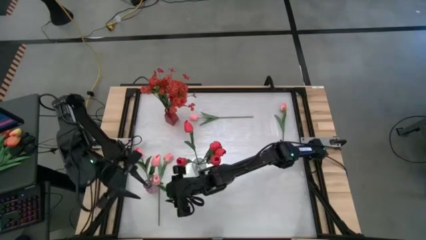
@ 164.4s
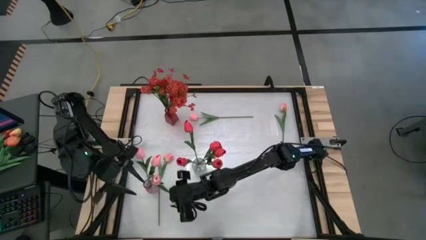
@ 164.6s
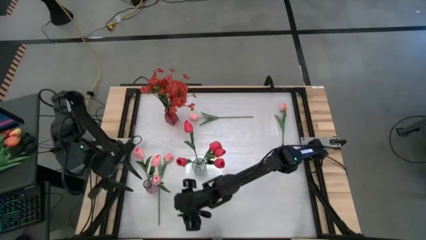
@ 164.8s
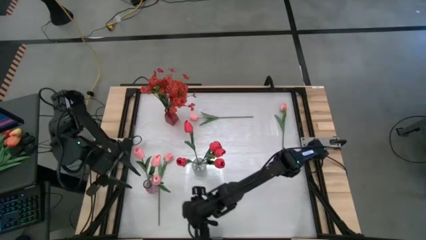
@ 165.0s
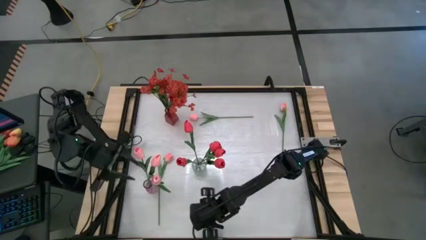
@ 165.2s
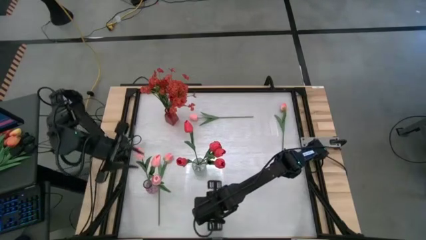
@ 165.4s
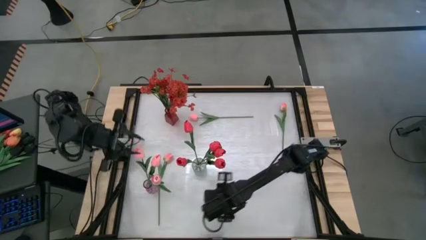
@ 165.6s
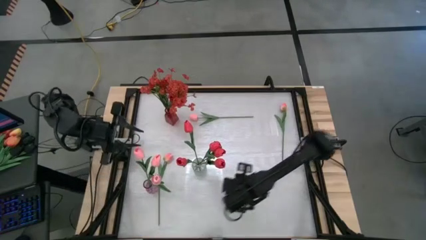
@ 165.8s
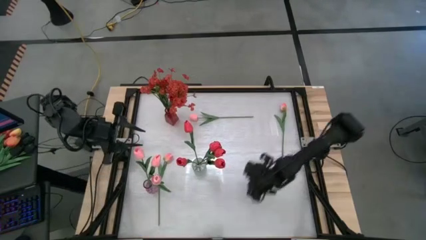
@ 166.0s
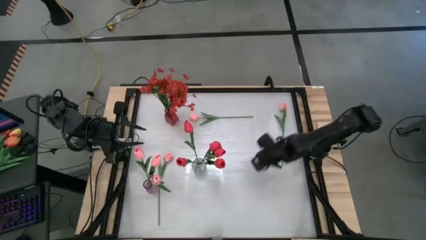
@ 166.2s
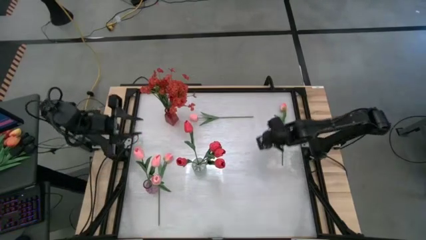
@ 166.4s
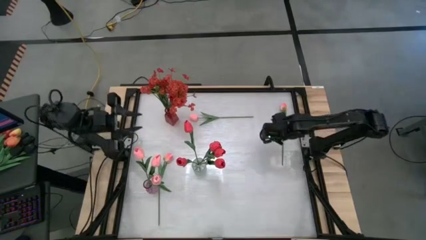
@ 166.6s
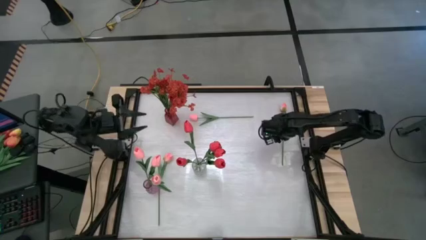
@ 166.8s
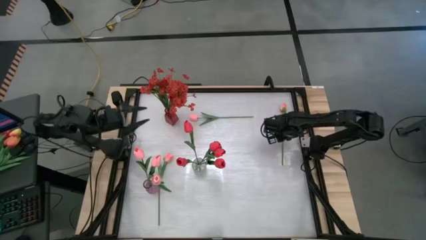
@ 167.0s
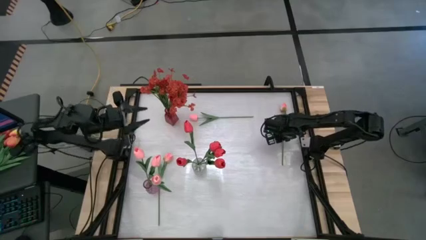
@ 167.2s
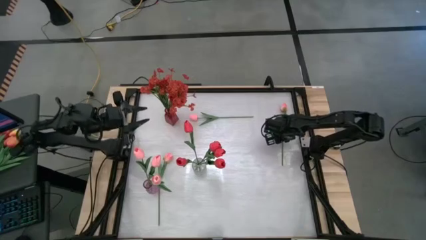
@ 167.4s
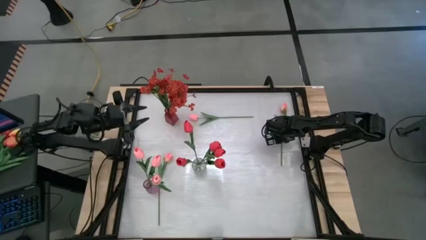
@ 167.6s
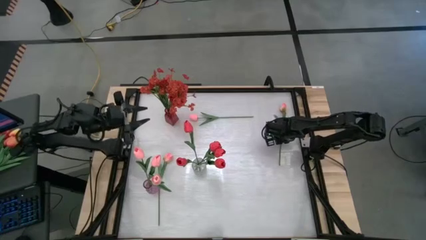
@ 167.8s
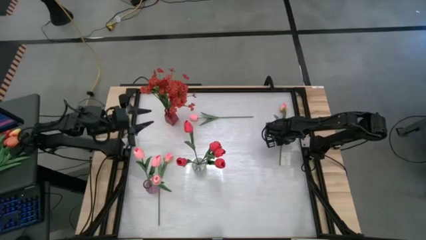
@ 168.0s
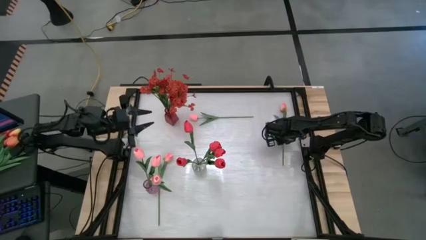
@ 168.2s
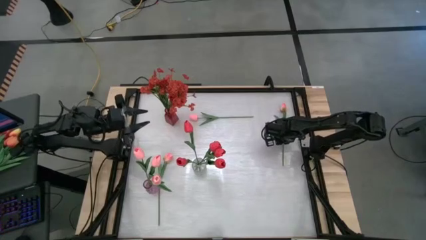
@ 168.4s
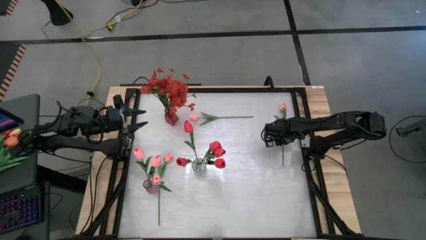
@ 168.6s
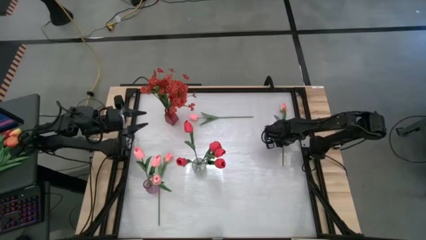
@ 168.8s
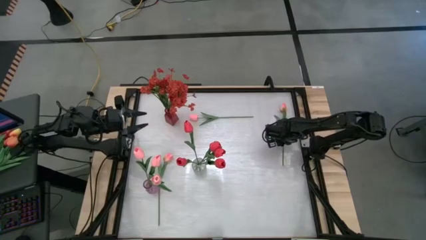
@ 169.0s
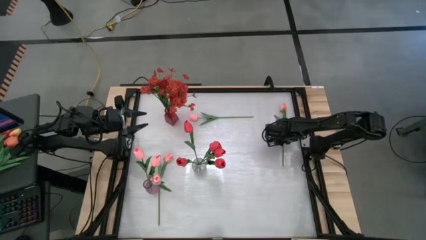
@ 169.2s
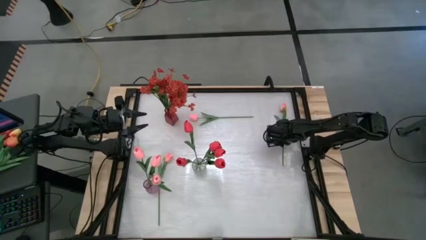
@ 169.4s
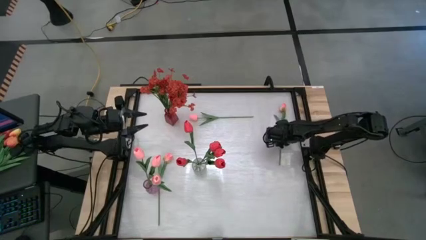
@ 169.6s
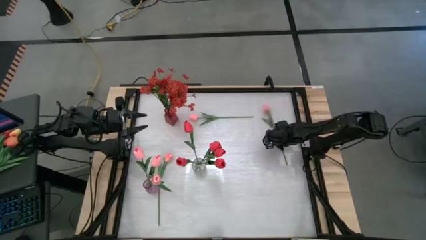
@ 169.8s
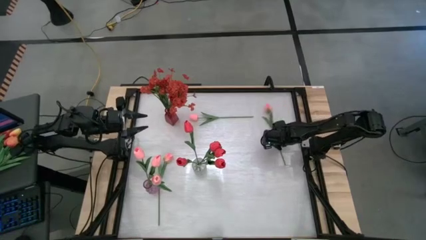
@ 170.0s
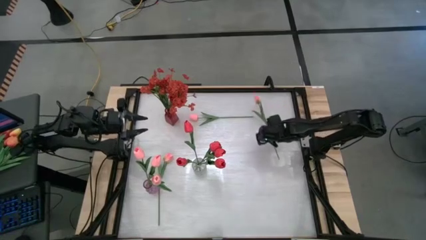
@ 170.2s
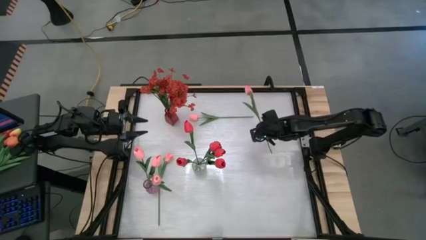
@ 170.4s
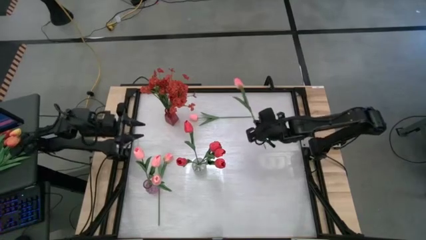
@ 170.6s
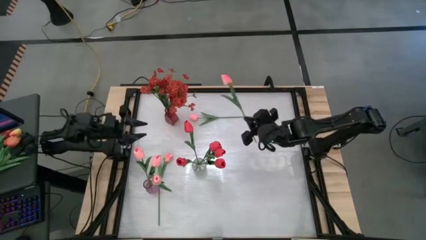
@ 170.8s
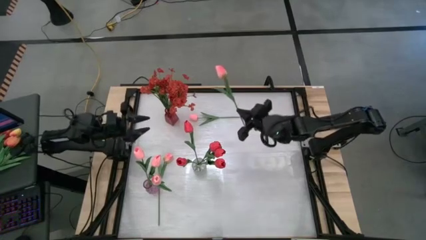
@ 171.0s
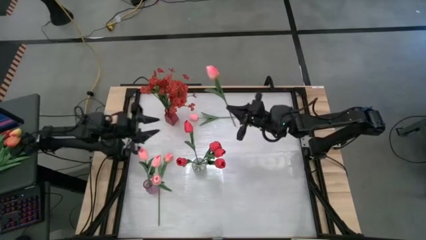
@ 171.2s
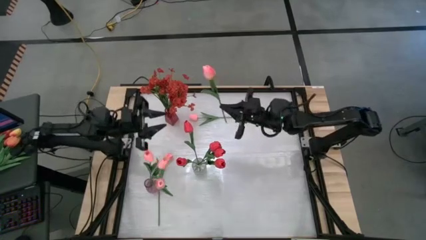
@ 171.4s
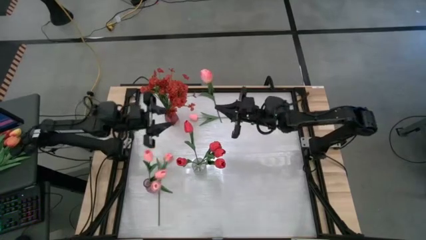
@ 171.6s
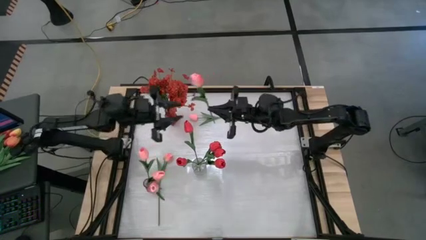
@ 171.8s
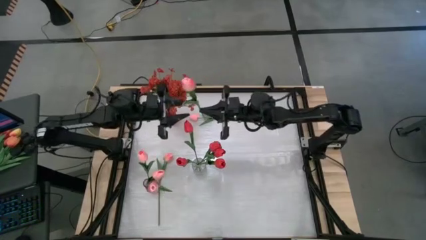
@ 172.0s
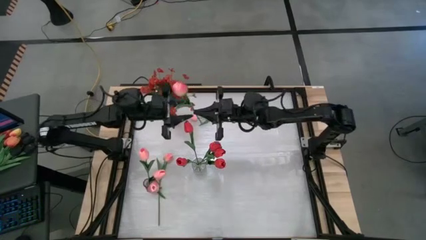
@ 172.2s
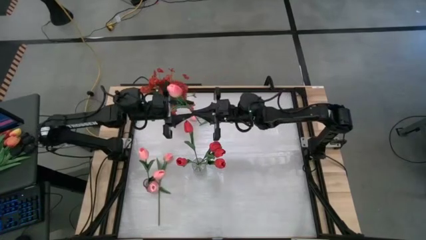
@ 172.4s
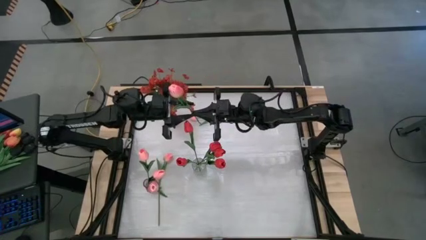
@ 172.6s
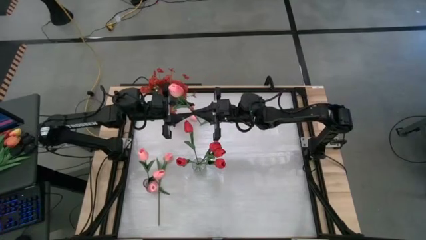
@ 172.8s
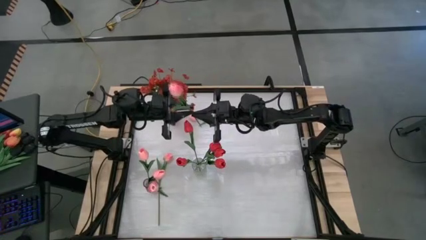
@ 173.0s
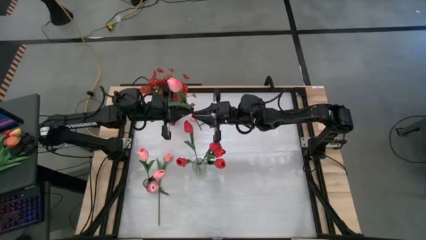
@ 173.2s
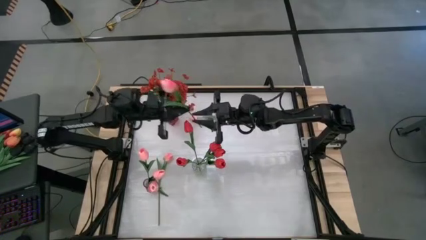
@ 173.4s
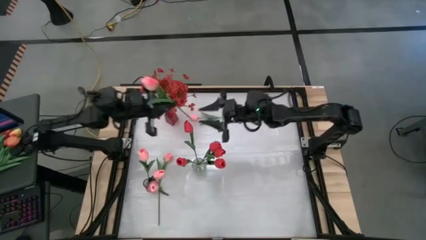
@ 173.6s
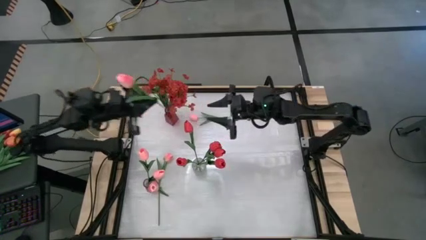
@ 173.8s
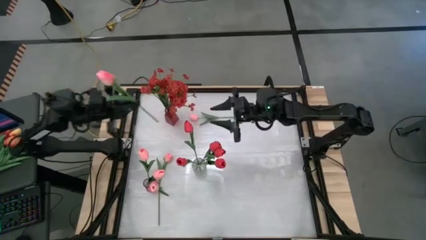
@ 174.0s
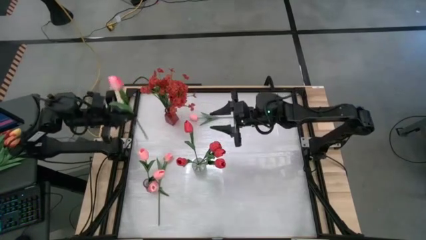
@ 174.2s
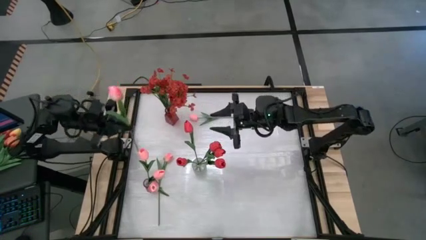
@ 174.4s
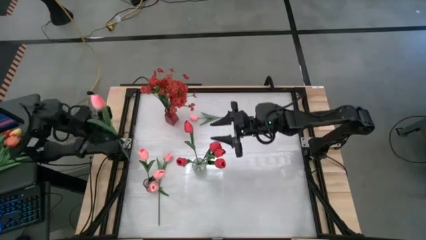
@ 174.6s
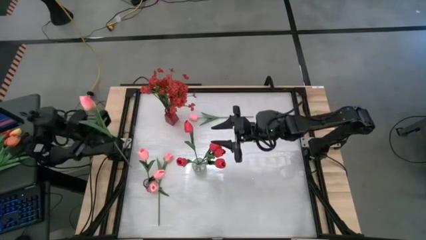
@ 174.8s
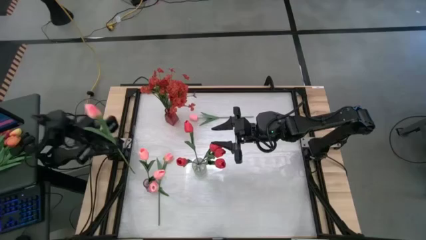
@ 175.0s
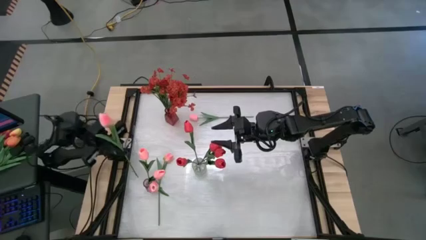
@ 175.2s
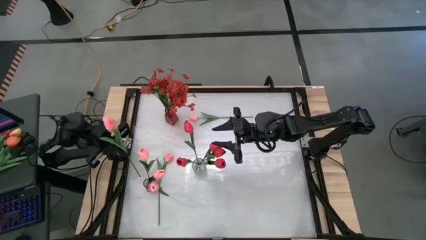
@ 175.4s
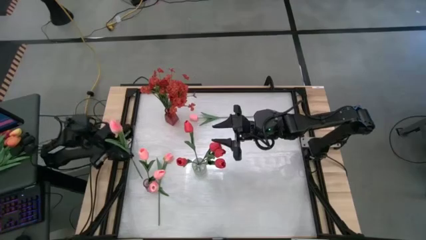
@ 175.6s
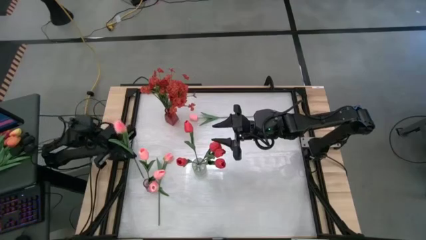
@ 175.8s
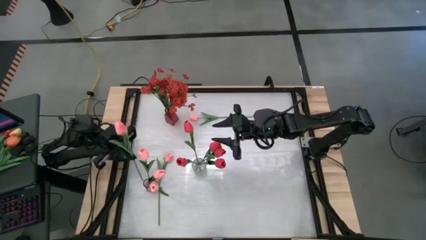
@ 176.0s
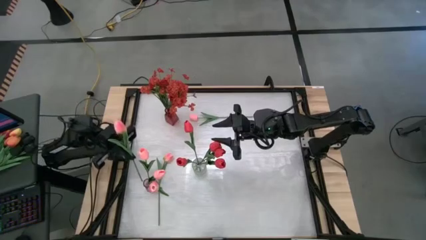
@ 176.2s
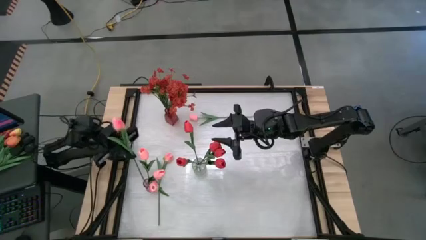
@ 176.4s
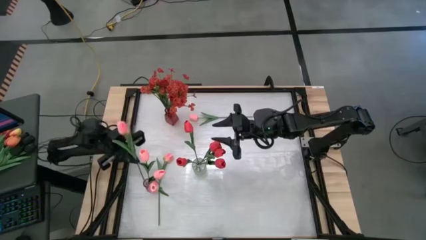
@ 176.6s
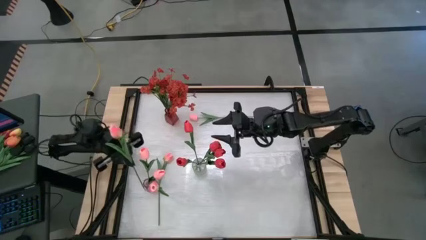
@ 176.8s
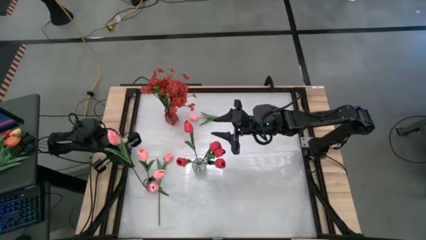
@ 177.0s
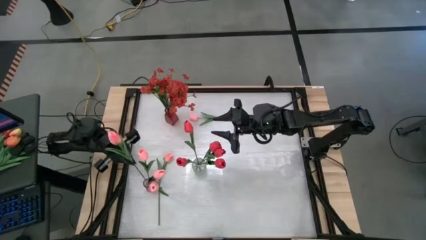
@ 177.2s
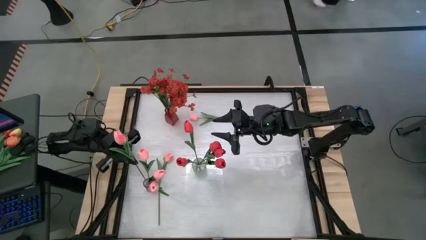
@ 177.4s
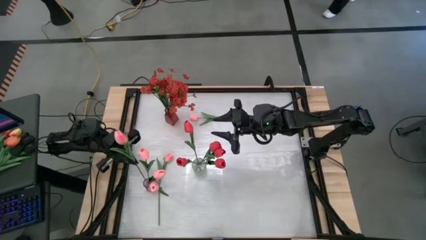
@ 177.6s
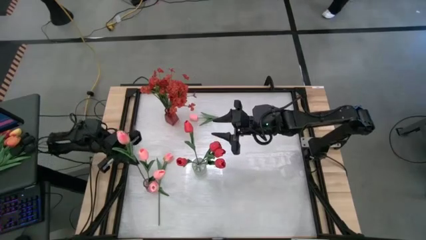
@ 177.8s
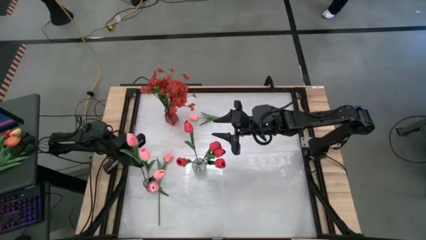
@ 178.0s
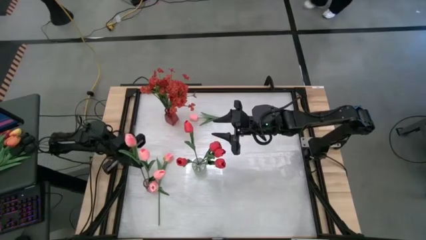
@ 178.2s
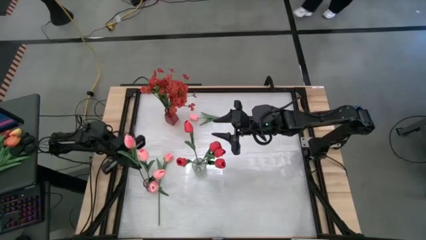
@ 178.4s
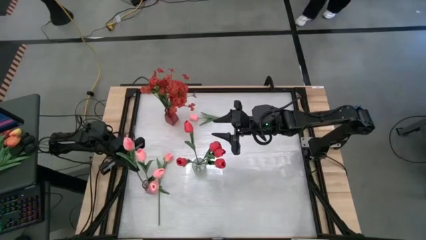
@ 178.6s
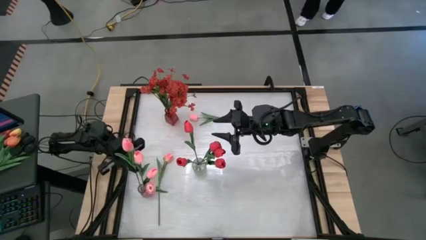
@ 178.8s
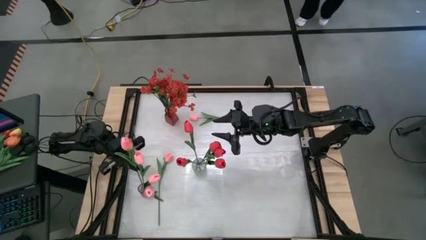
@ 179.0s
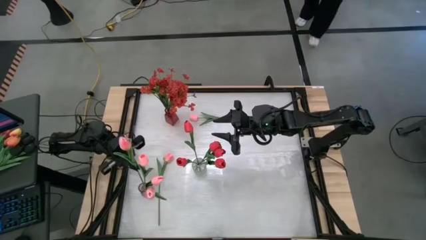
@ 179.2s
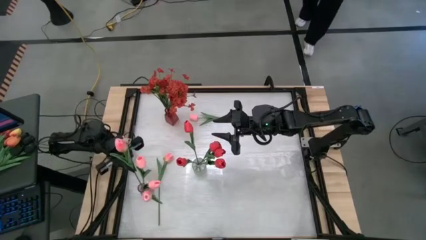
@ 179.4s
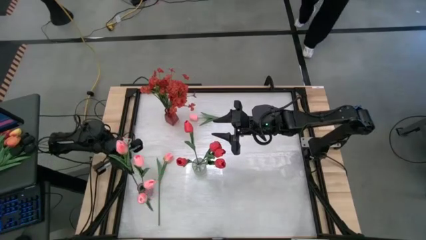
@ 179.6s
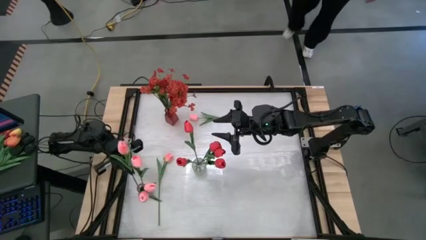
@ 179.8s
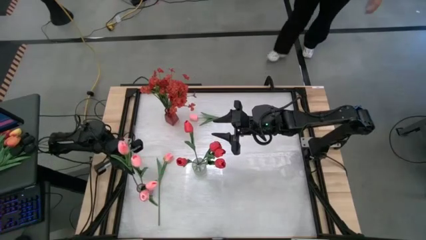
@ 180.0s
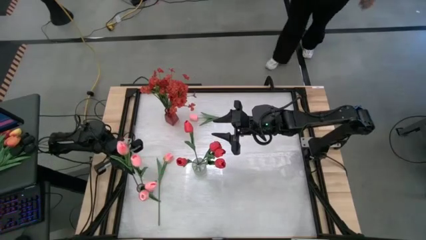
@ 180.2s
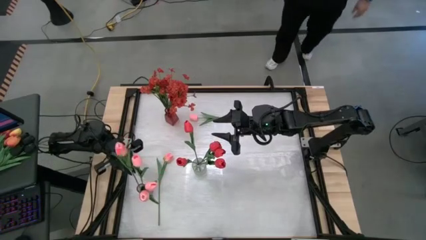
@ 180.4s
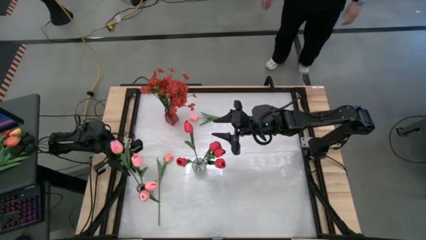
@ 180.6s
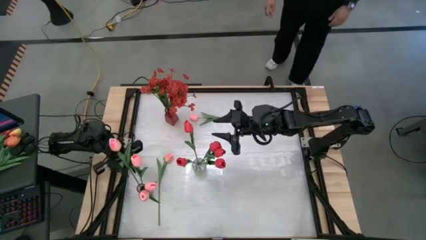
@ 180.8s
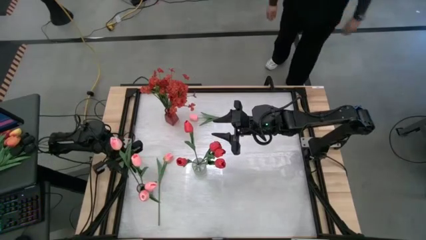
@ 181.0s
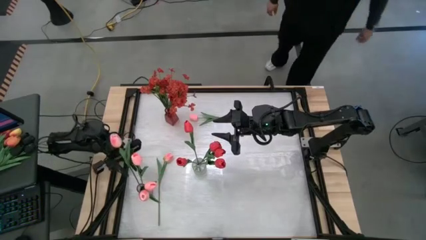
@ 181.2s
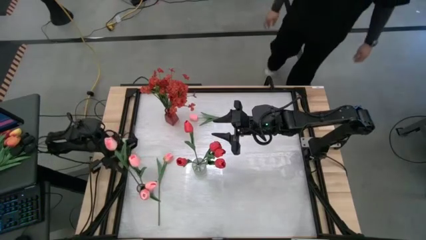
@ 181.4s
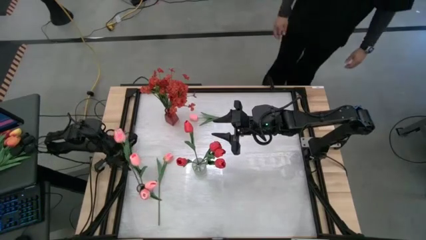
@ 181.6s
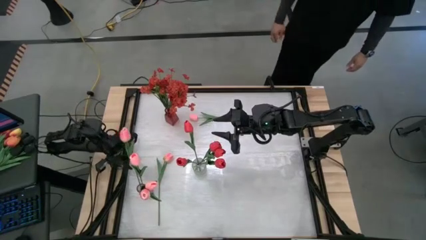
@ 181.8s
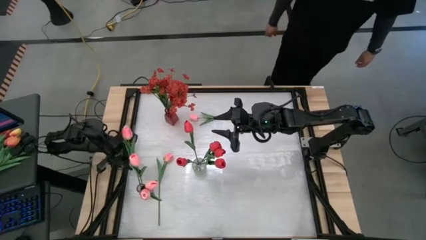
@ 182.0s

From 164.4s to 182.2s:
Task: Sort flowers into vase by color
Put the pink flower into the purple vase
